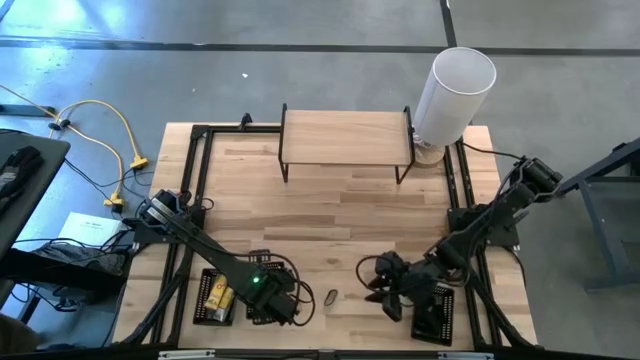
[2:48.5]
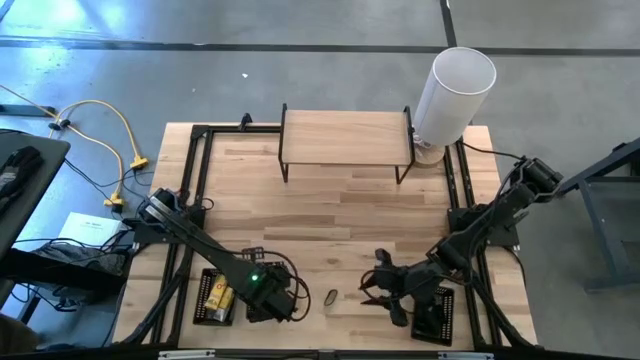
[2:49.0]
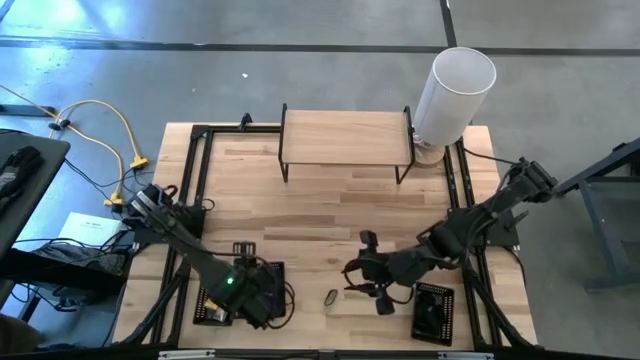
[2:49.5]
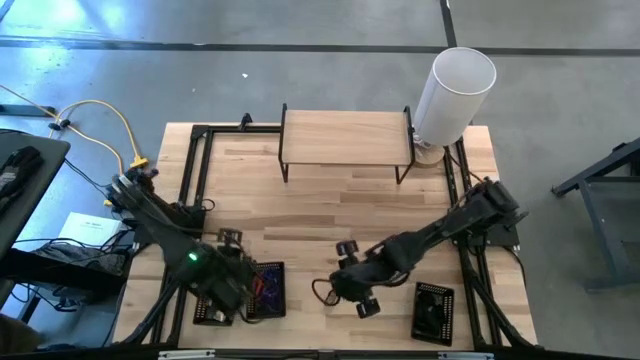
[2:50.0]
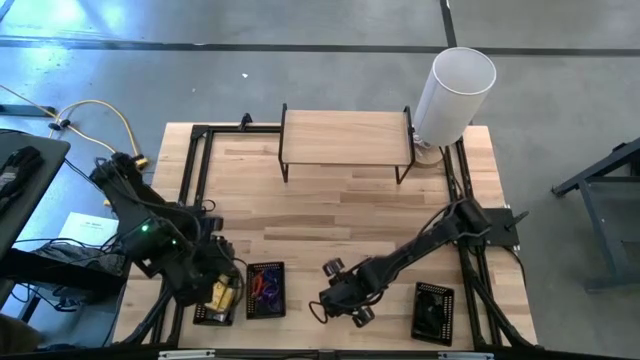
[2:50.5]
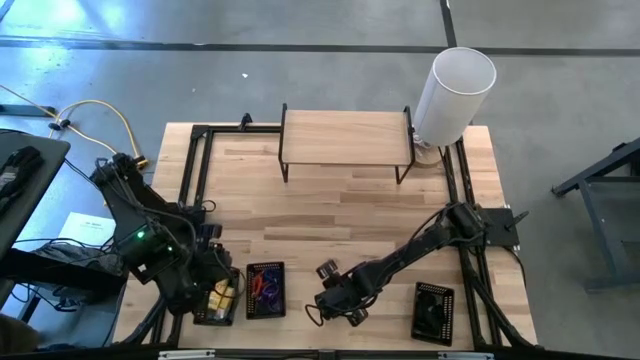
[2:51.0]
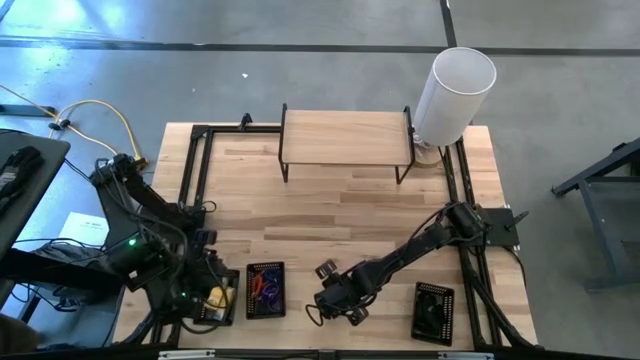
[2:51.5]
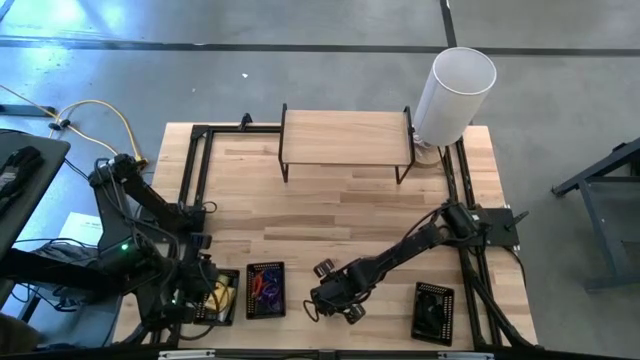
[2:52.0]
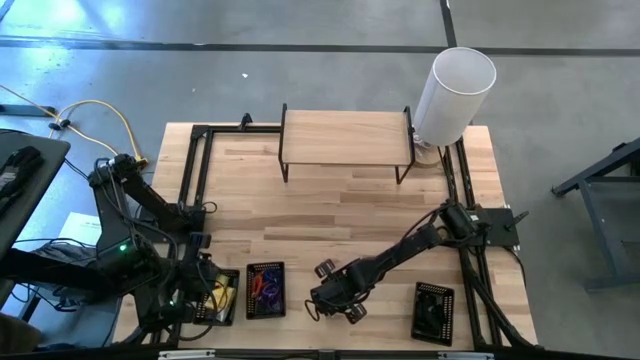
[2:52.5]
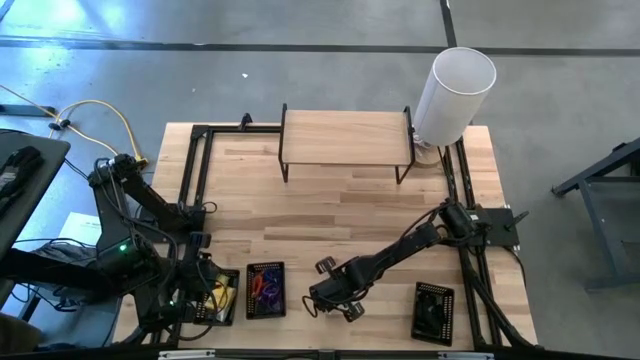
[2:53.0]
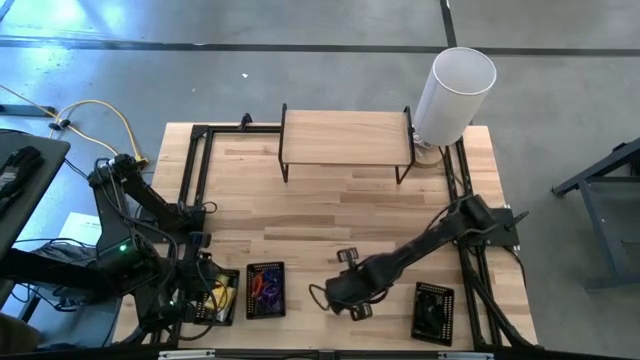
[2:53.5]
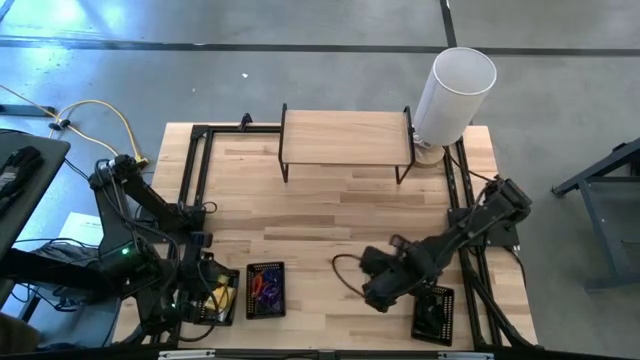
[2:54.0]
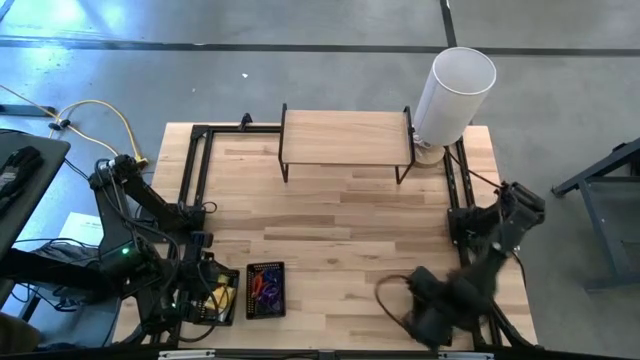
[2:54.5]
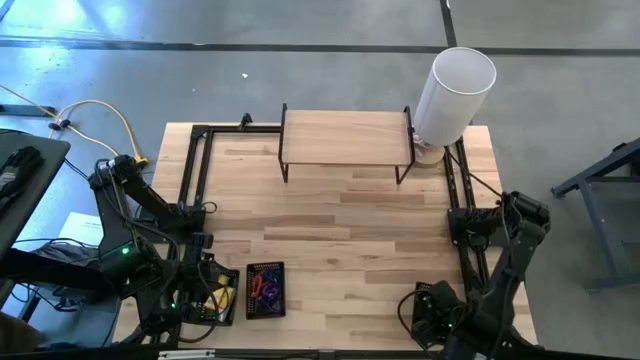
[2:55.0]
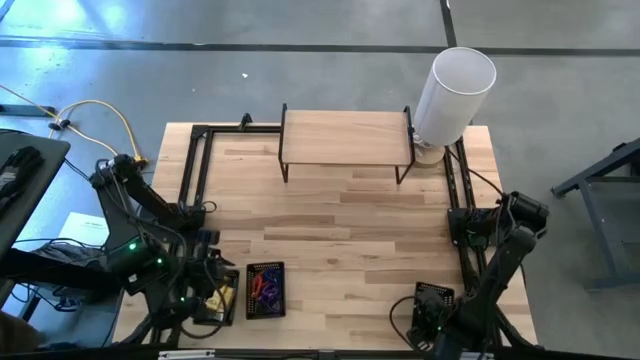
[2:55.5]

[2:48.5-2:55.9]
Task: Pick & Place Office Desk Supplies
Put the black rubber band into the right black basket

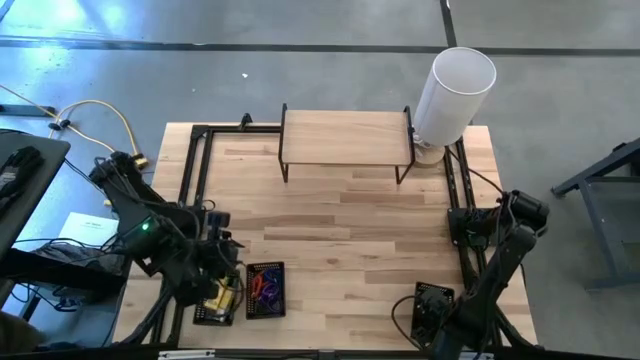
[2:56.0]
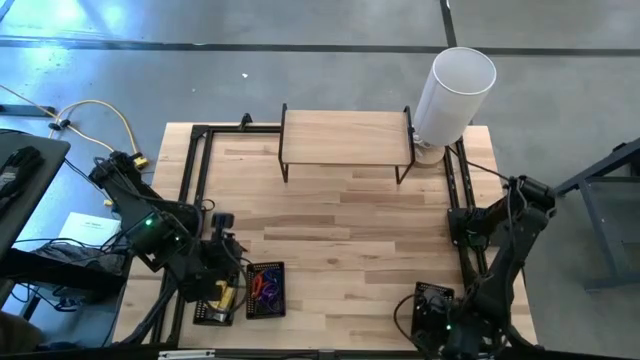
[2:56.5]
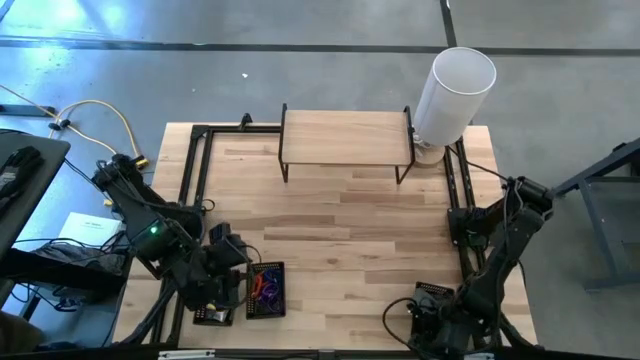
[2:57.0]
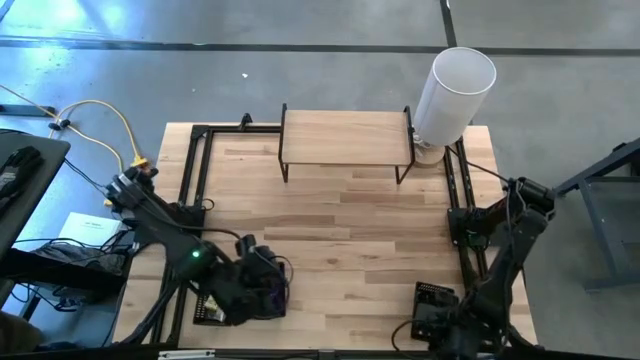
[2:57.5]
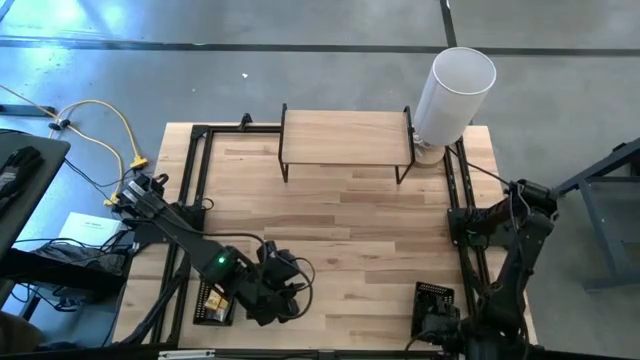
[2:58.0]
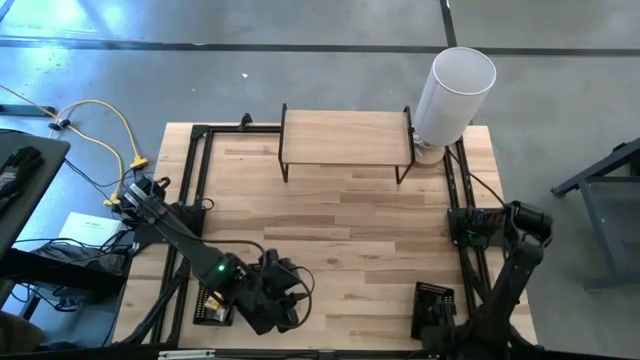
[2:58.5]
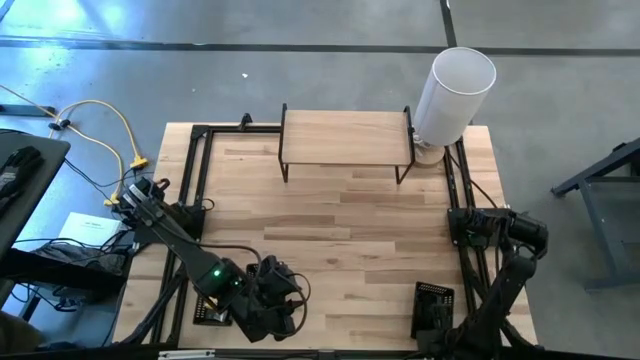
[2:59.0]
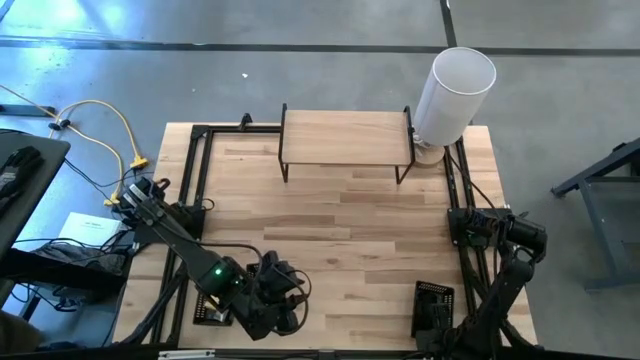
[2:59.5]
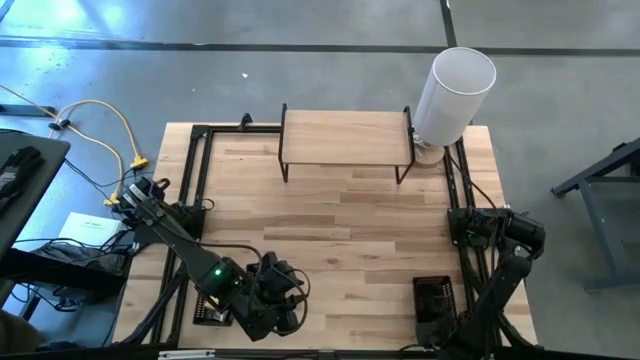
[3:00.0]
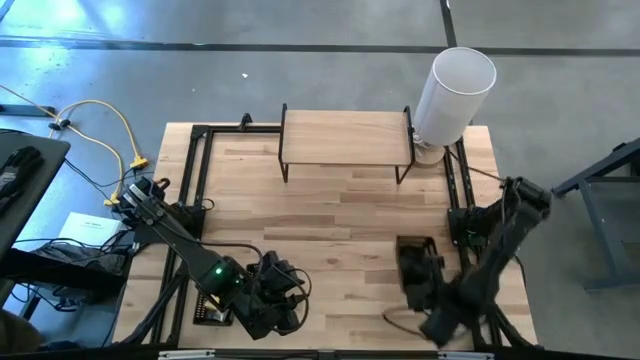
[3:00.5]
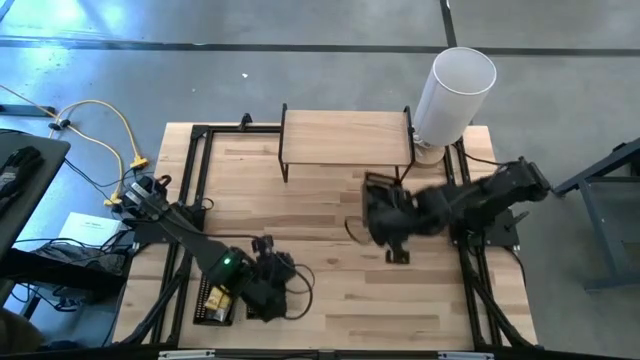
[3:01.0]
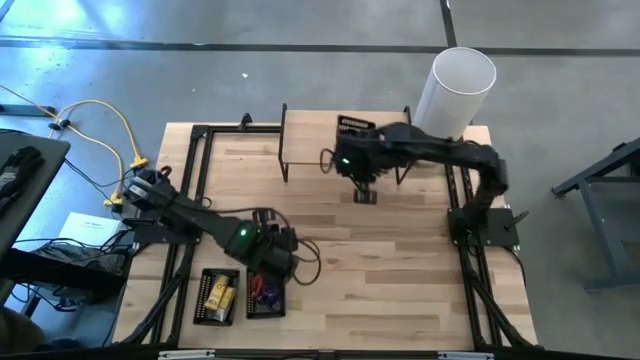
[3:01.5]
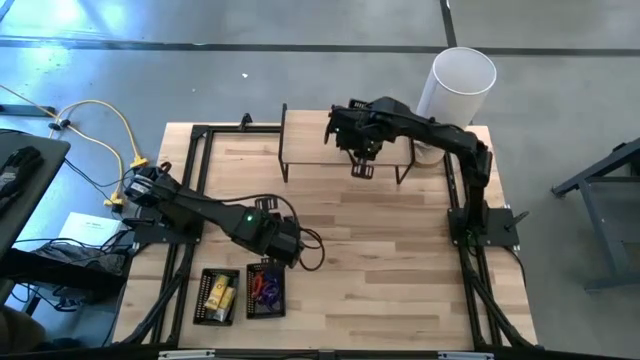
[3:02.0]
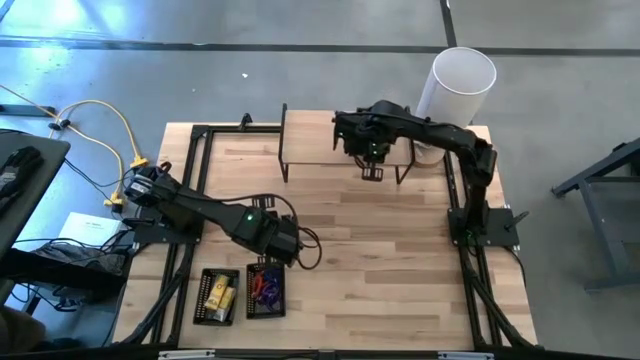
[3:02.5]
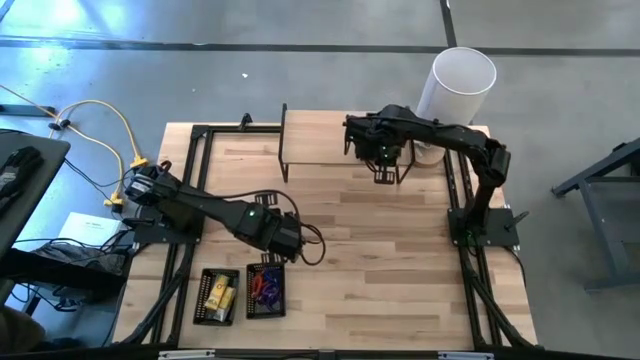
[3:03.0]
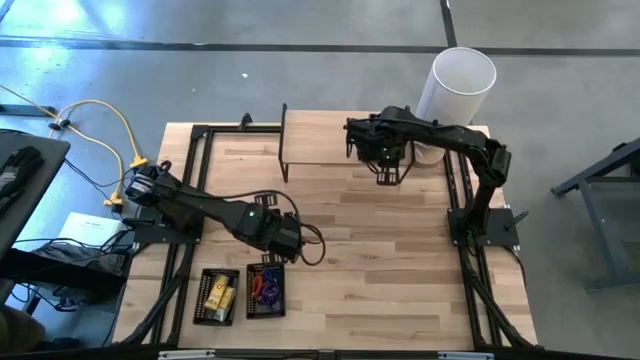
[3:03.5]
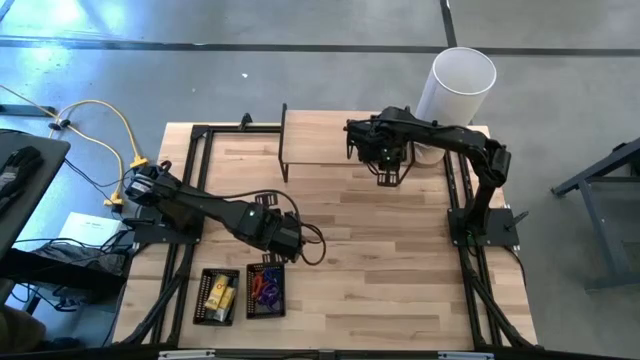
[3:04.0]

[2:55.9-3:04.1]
Put the right black basket with the rubber bands on the shelf

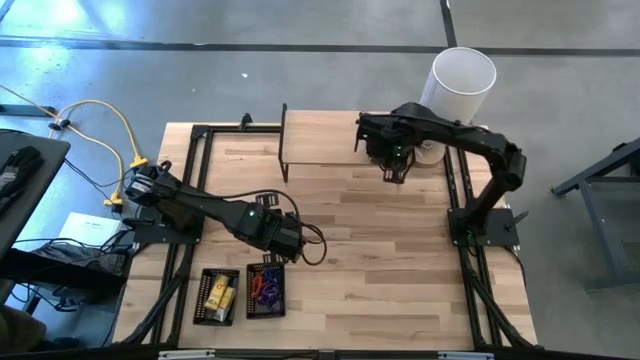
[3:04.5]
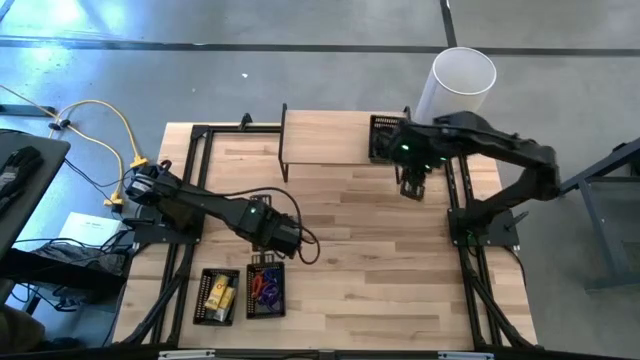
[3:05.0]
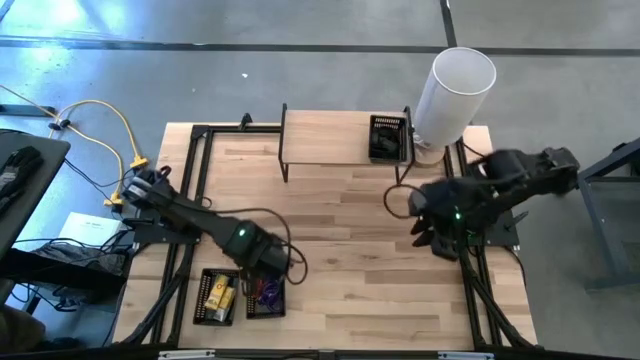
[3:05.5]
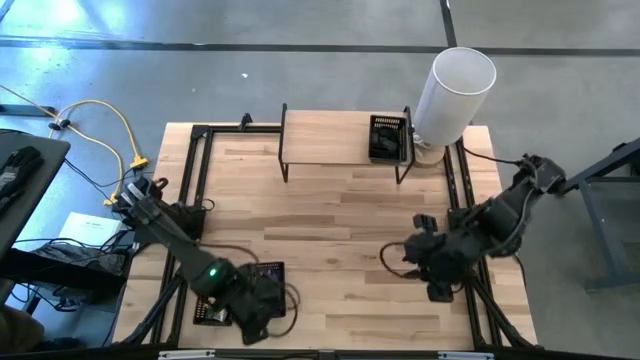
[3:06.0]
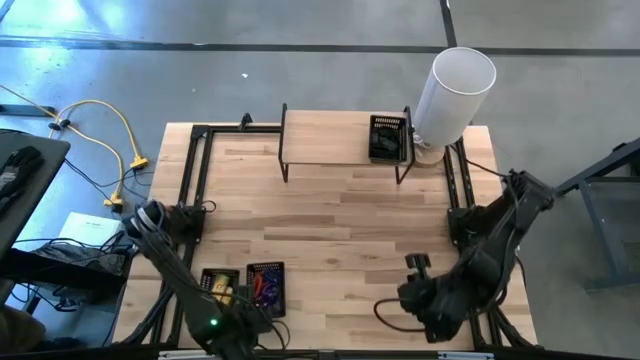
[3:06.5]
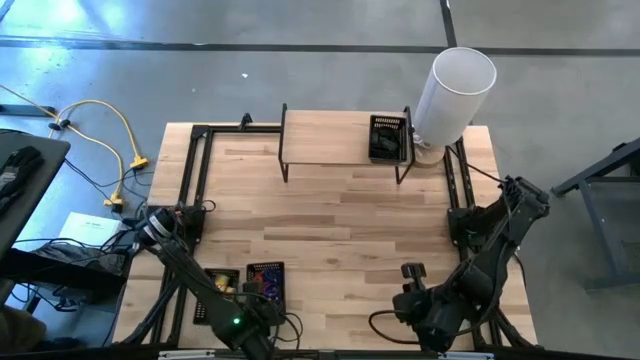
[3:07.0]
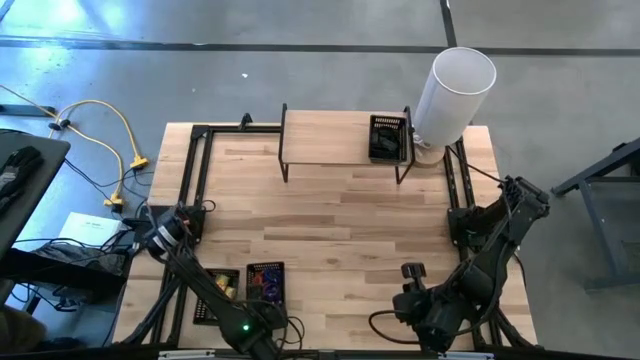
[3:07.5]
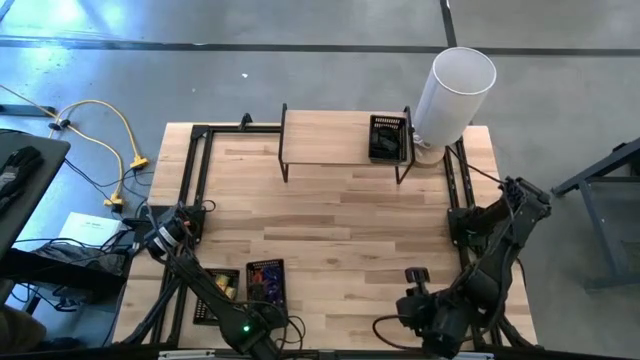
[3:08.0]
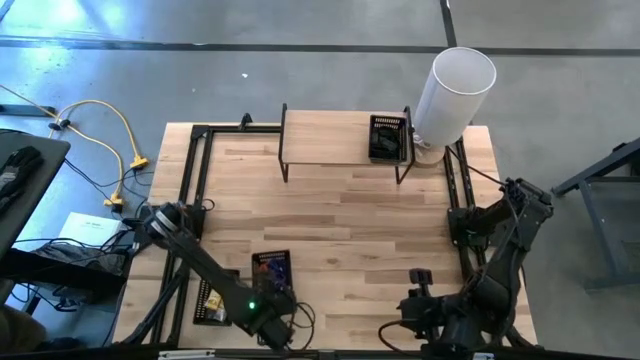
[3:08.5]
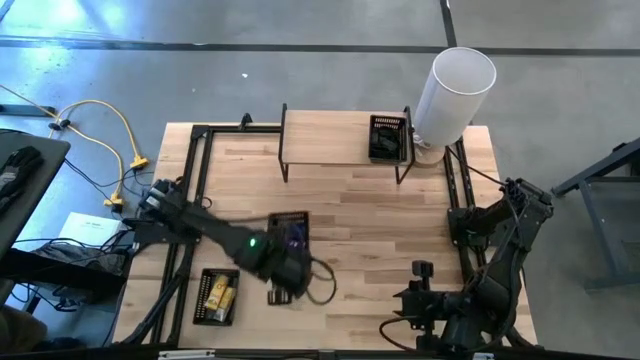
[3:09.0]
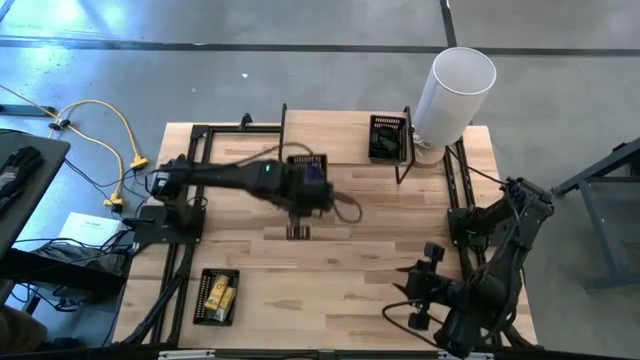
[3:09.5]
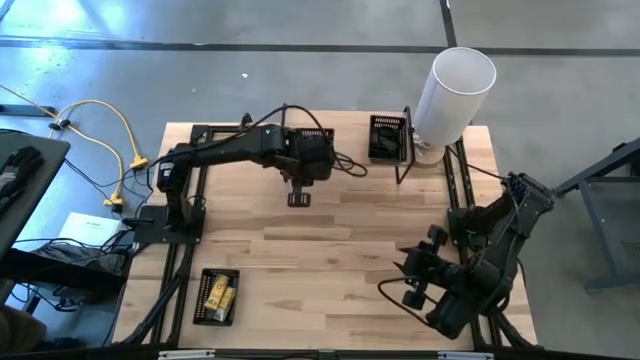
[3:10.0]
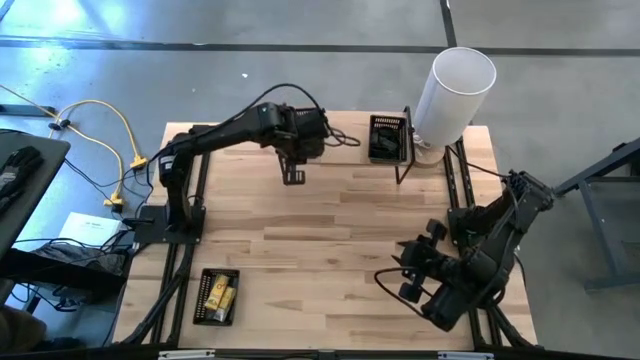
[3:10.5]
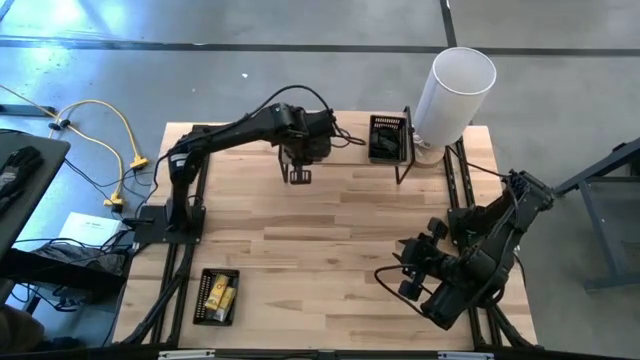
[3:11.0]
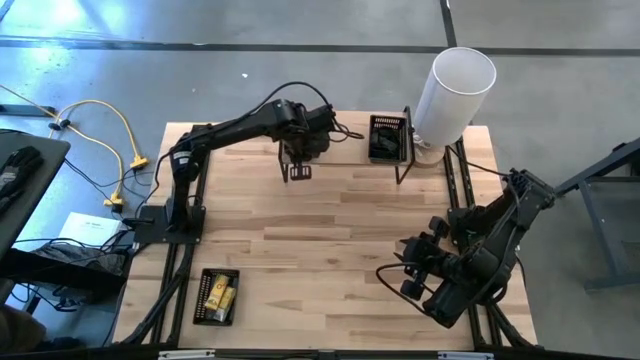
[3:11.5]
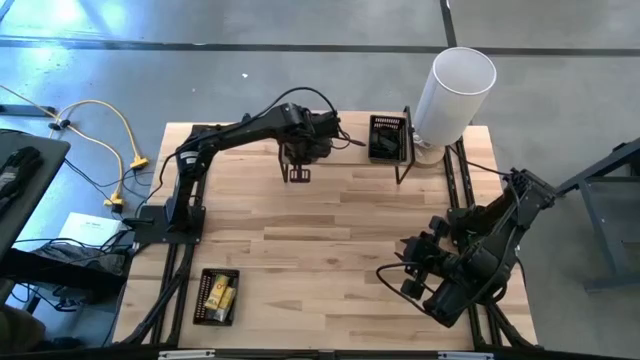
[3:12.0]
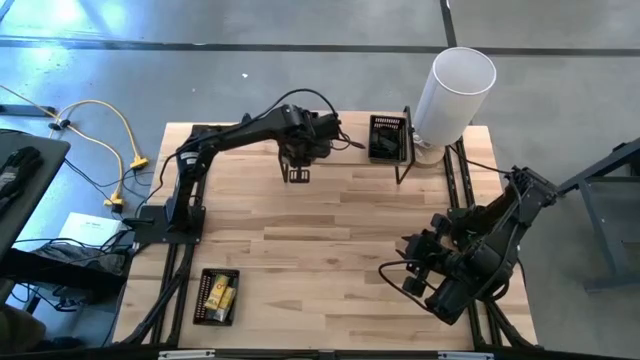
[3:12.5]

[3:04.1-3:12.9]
Put the right black basket with the spring key chains on the shelf
